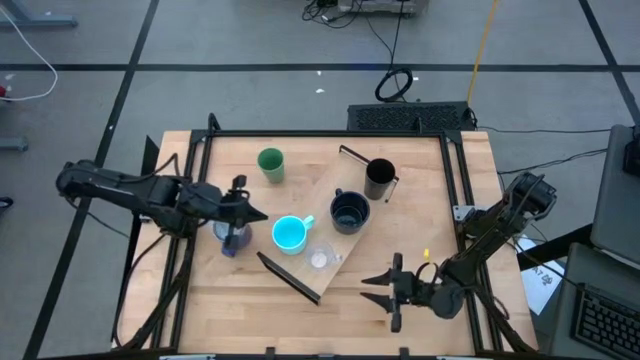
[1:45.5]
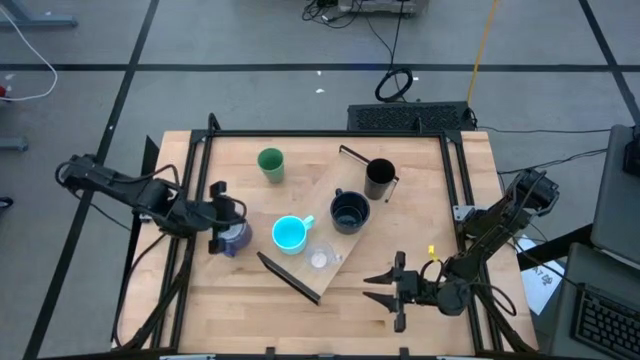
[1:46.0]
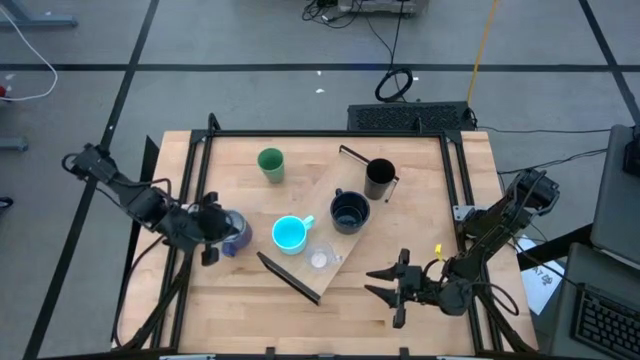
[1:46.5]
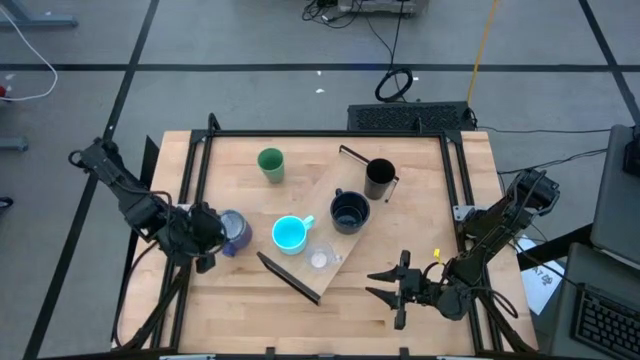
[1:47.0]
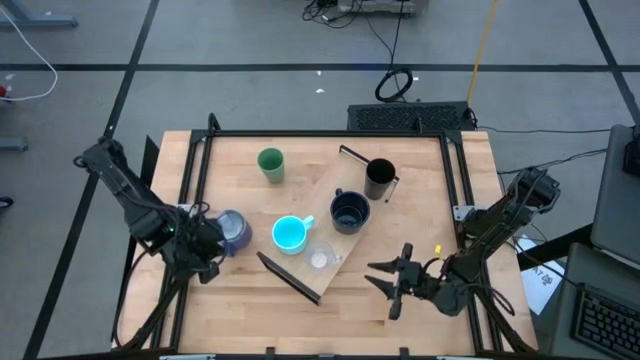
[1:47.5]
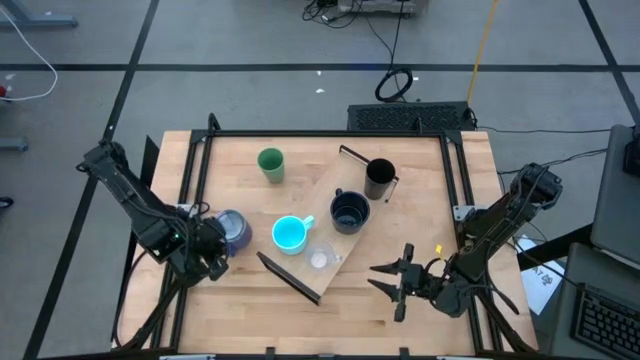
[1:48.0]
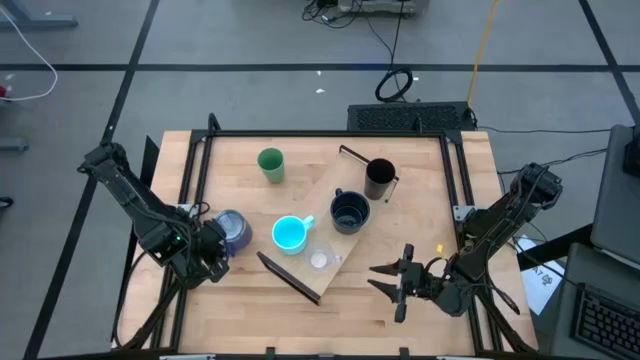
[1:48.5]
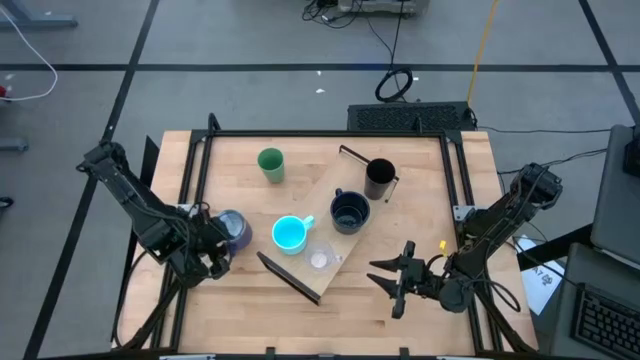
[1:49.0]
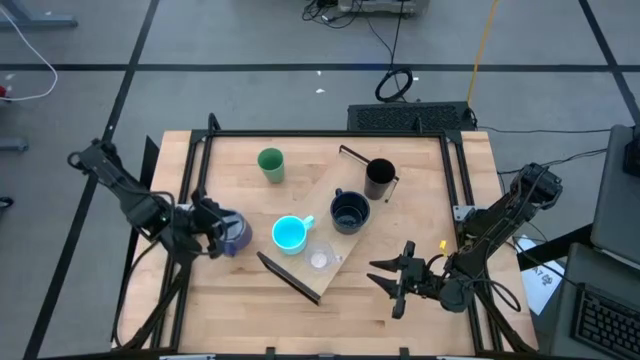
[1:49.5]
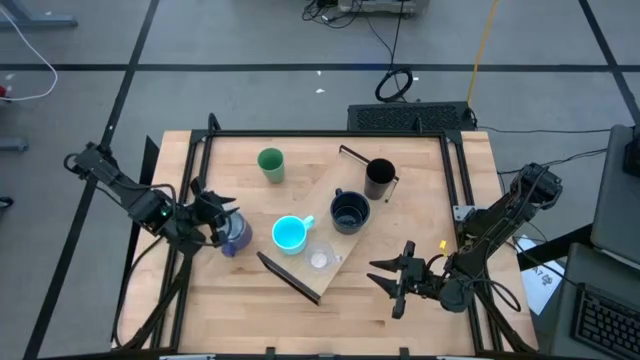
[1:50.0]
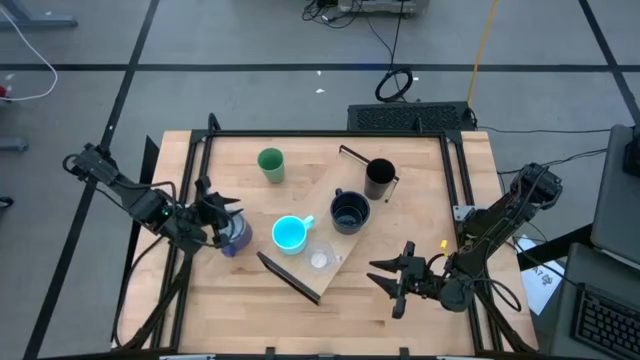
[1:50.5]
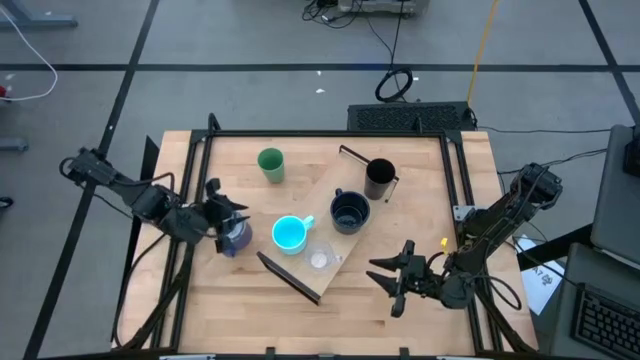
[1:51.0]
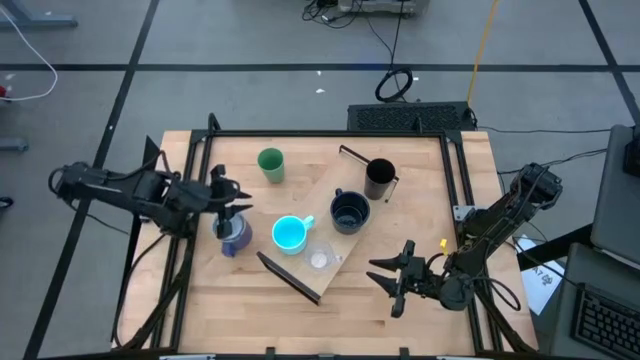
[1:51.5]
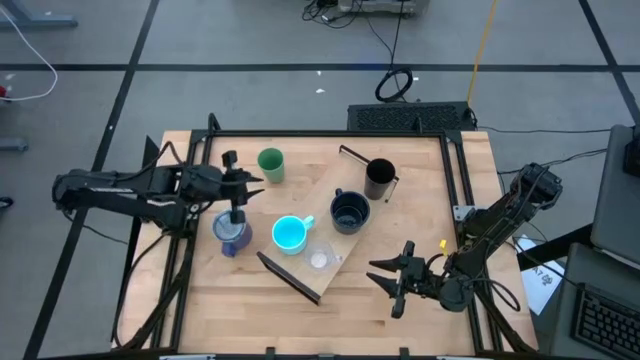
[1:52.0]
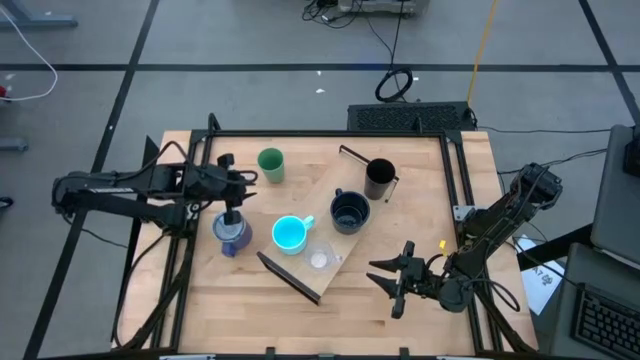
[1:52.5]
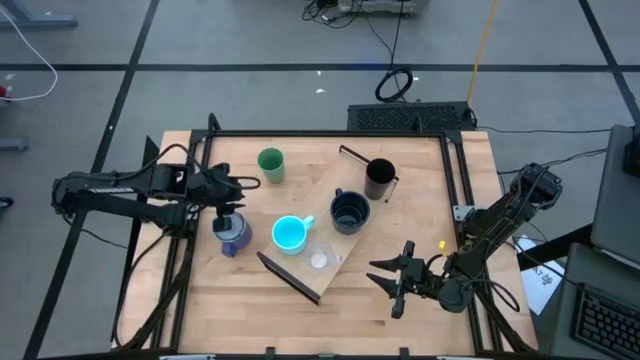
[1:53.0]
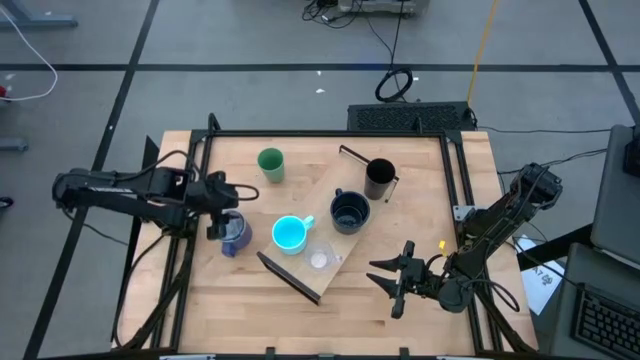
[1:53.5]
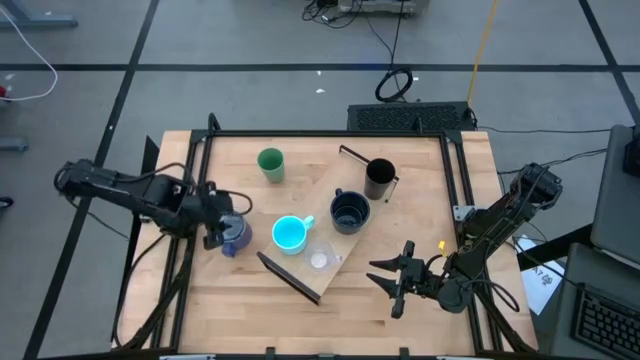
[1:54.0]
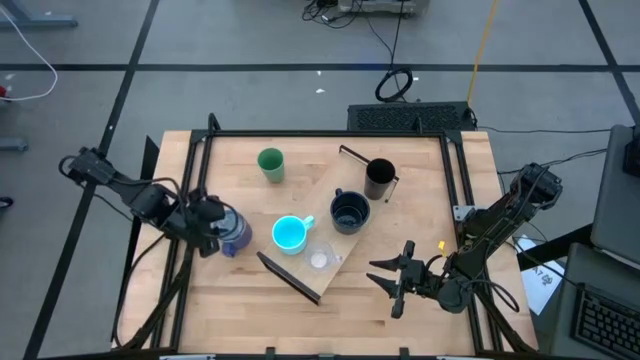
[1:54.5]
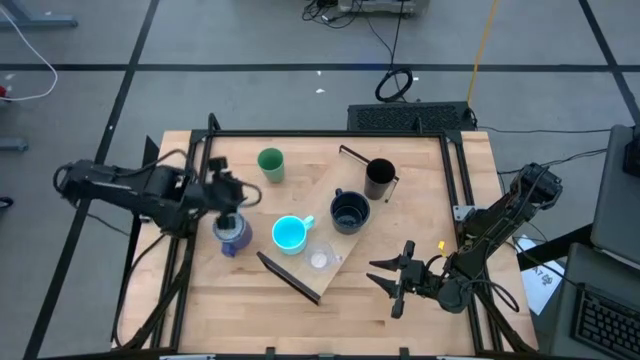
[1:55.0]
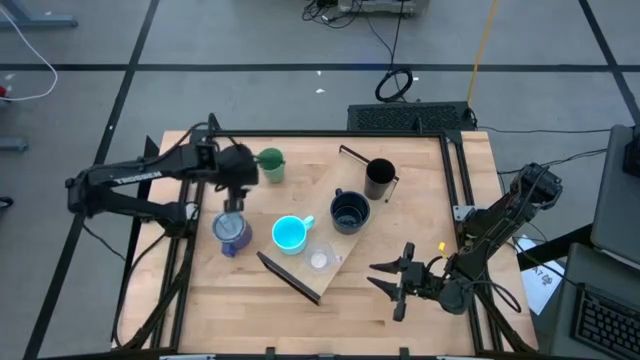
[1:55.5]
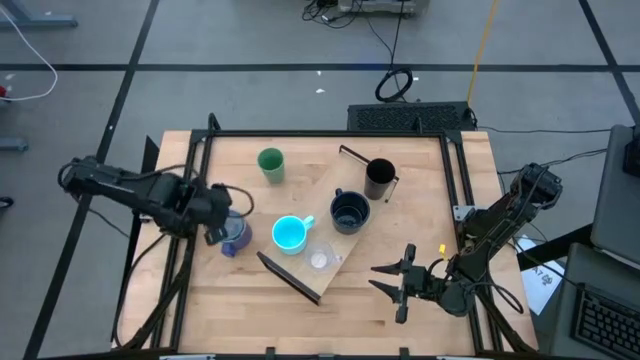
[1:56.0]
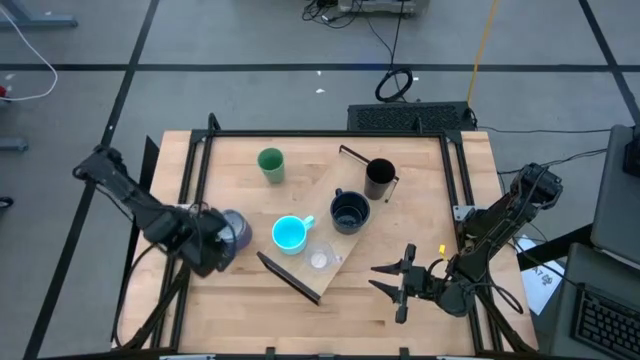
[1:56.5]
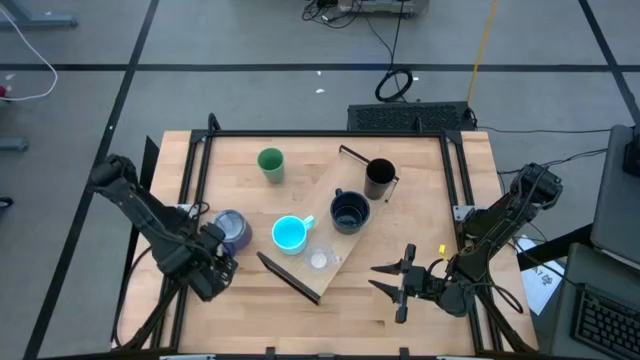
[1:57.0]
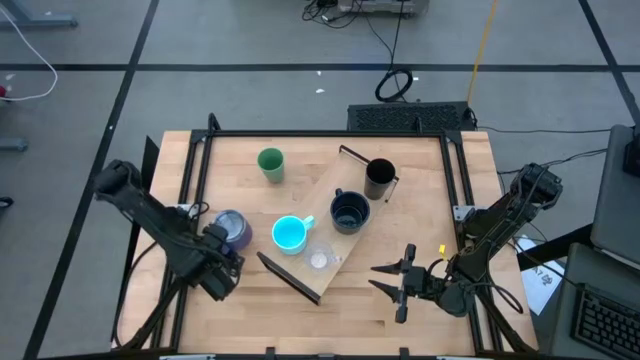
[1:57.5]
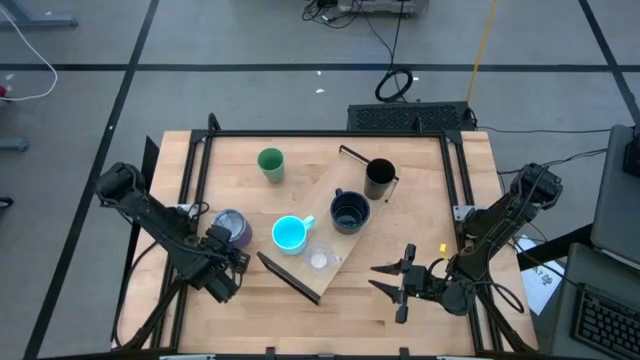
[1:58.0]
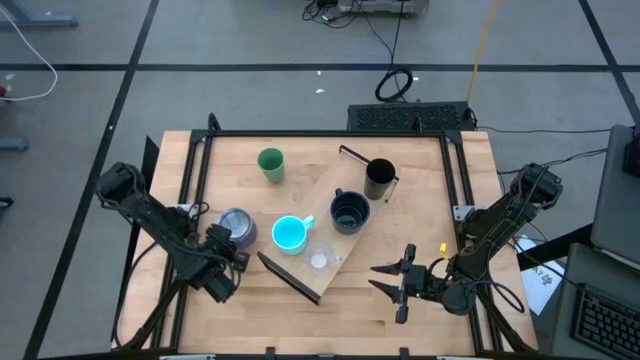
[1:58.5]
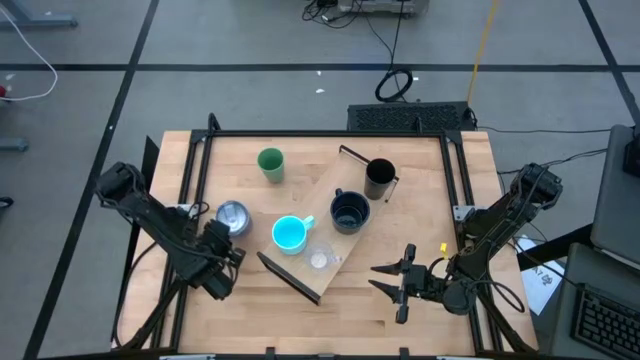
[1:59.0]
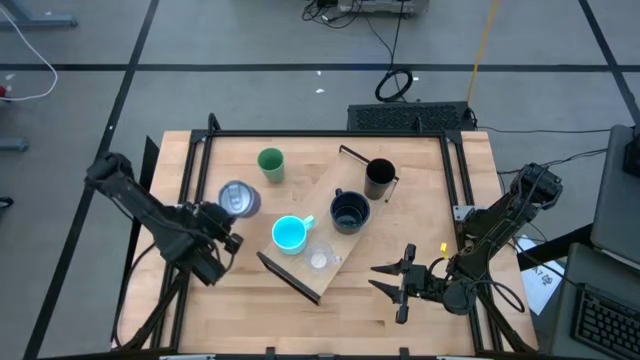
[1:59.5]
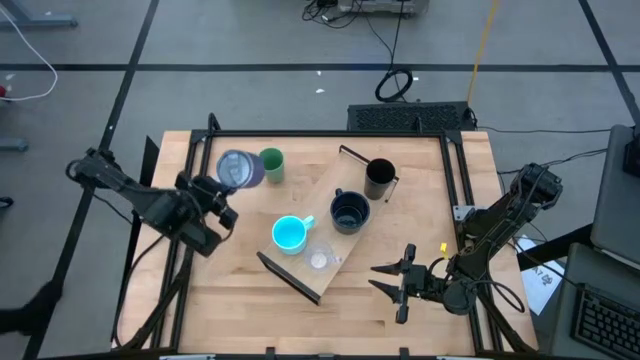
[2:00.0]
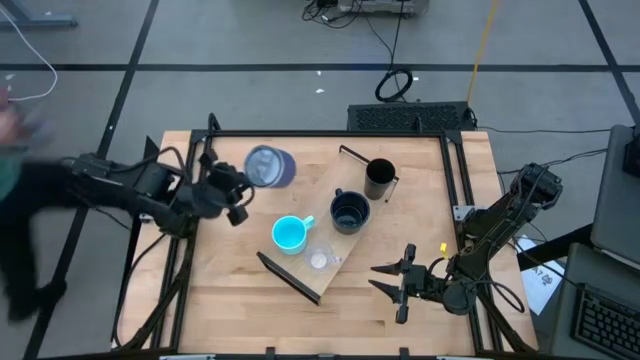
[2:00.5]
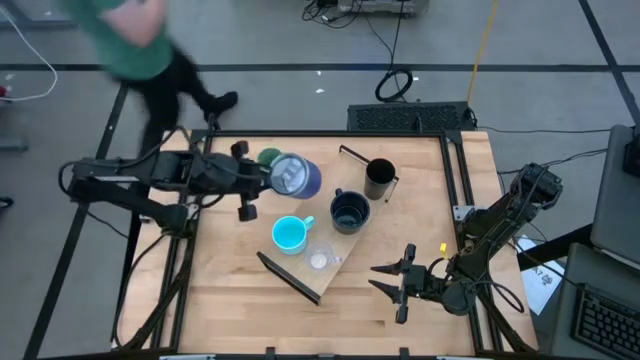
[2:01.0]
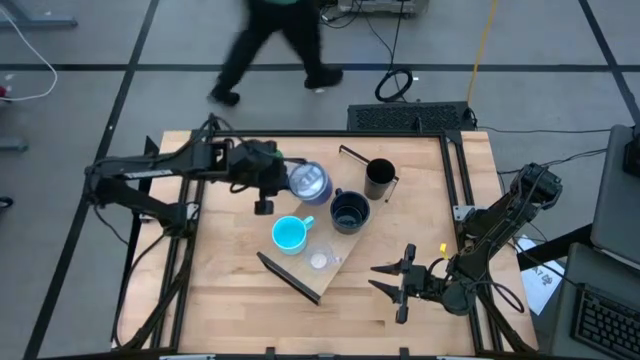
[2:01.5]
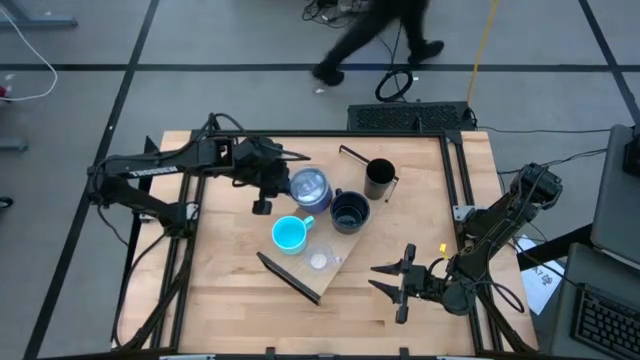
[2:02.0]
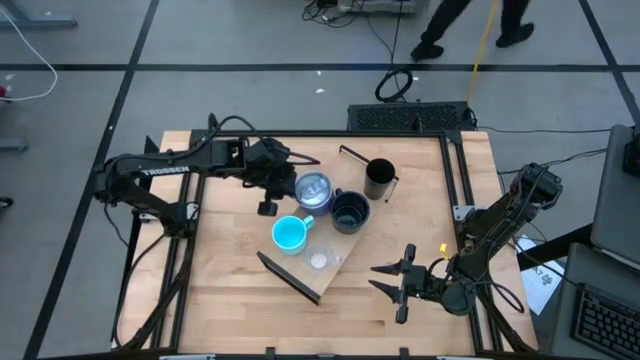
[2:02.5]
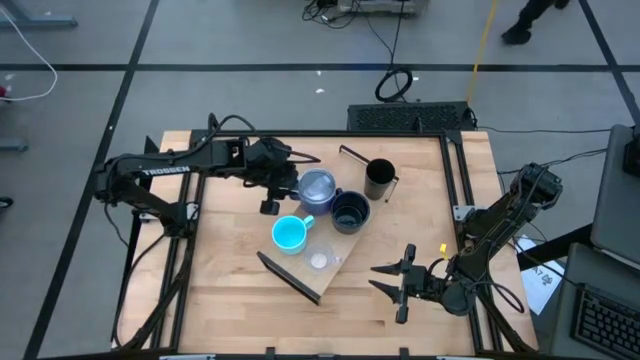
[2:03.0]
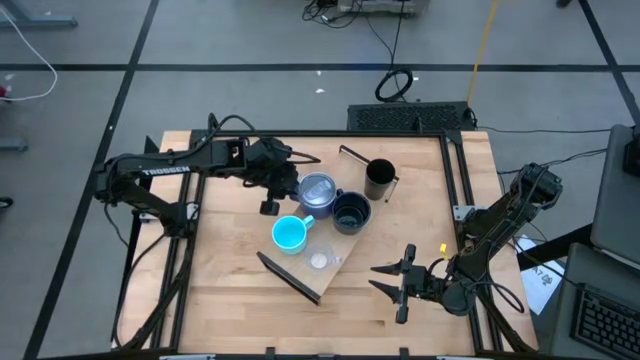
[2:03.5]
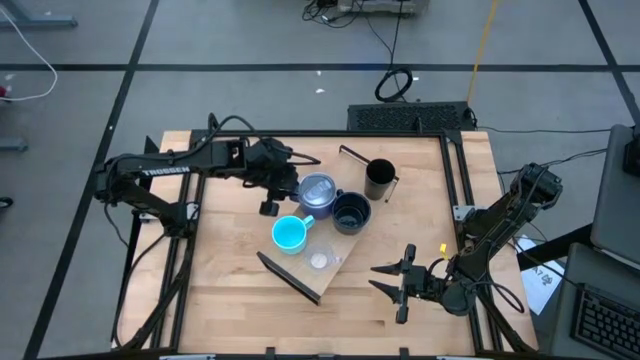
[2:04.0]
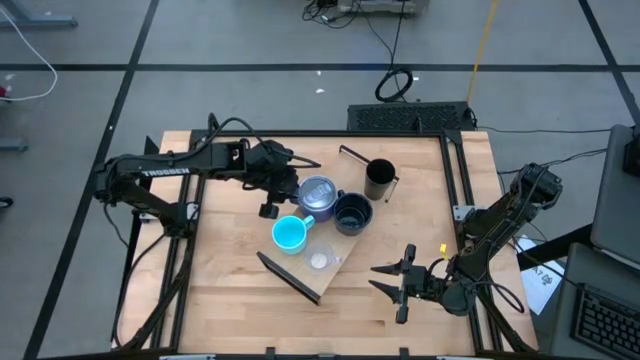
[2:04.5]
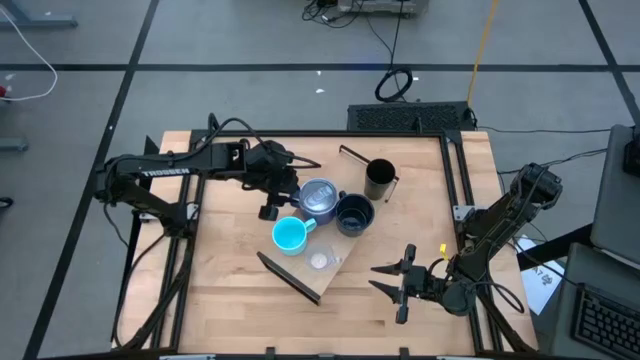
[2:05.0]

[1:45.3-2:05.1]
Task: Stack small to large cups/mugs on shelf
Put the purple cup on the shelf aligned with the dark blue cup

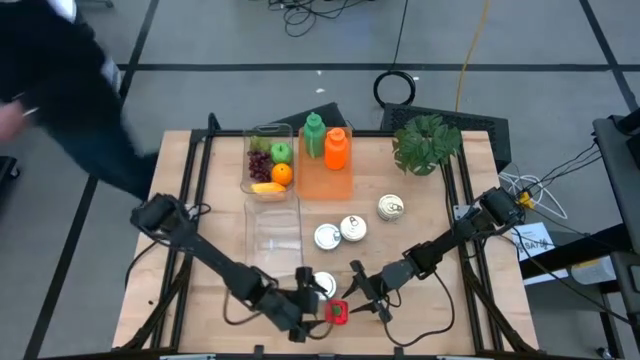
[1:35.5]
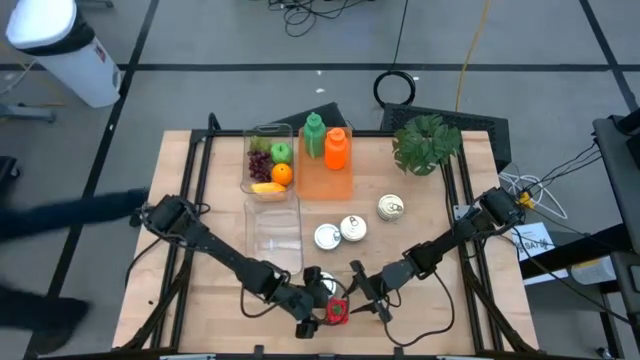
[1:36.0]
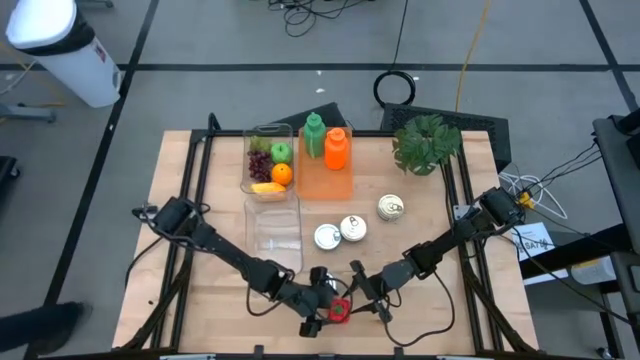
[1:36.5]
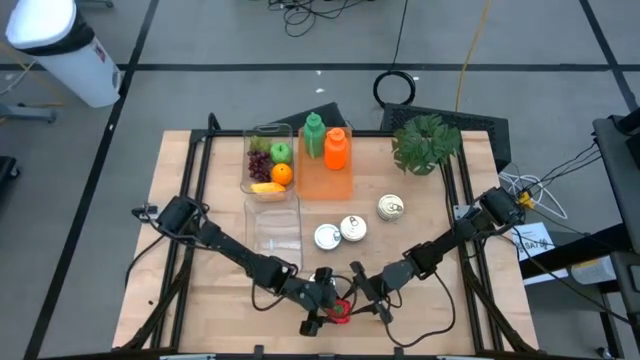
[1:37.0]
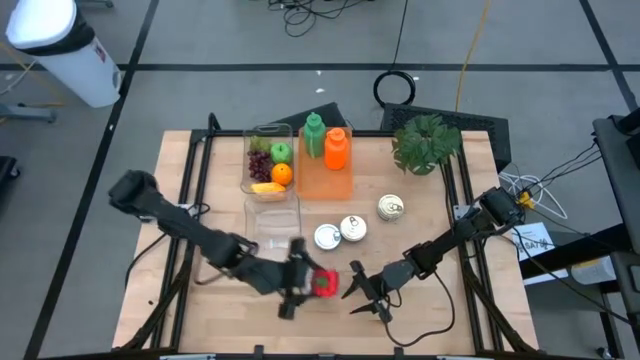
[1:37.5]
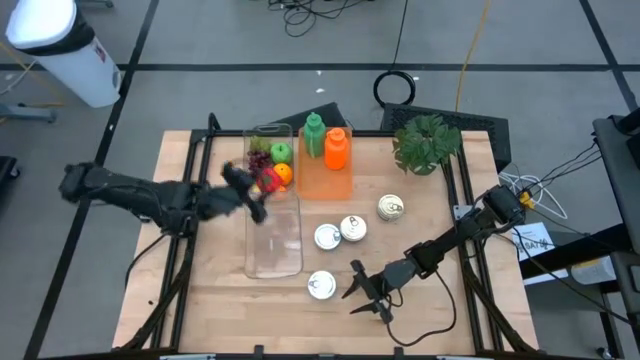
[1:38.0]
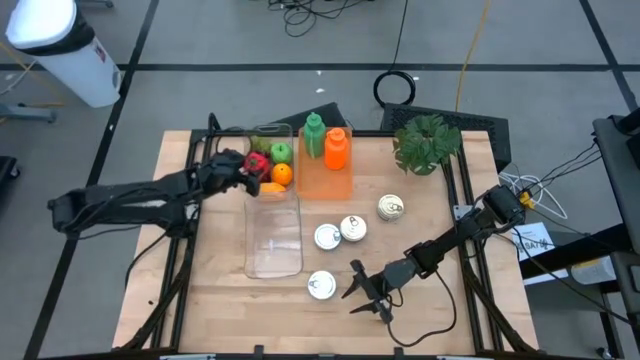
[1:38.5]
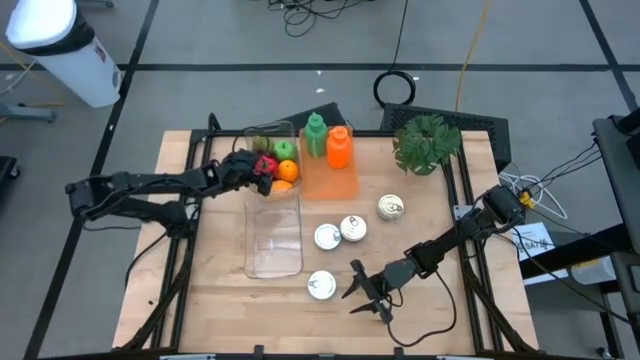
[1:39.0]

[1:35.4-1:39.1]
Task: Pick & Place Food Item
Put the red bell pepper into the top transparent bin
